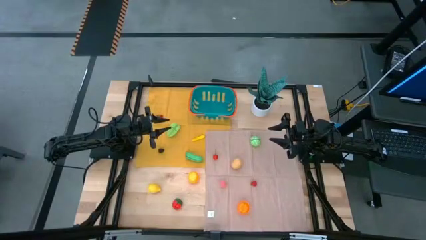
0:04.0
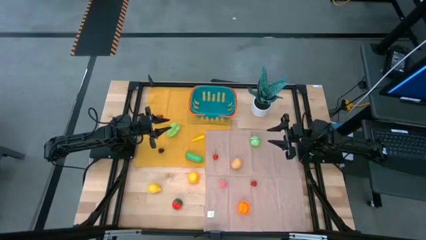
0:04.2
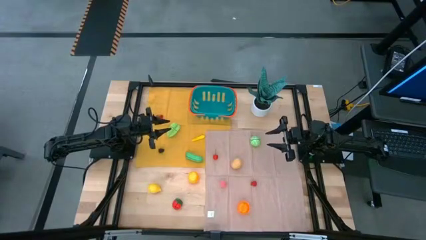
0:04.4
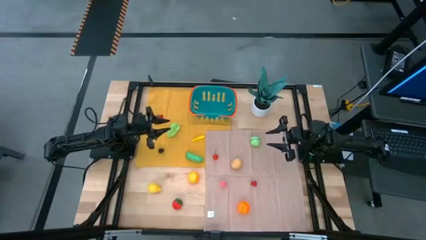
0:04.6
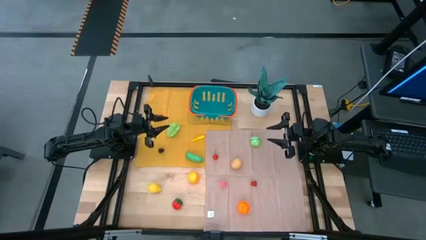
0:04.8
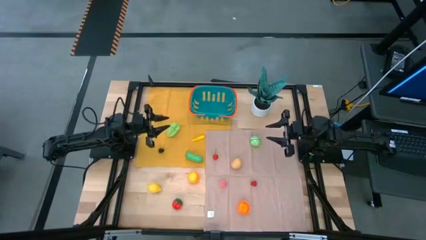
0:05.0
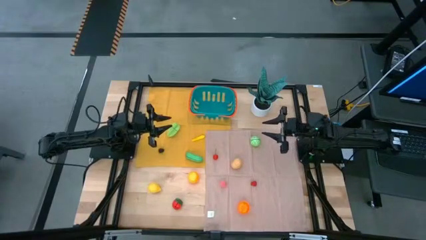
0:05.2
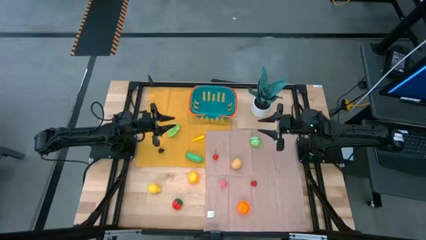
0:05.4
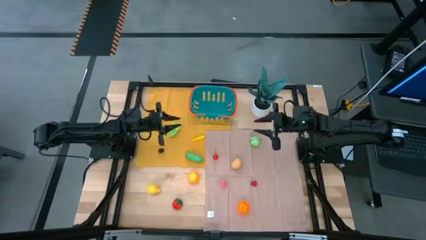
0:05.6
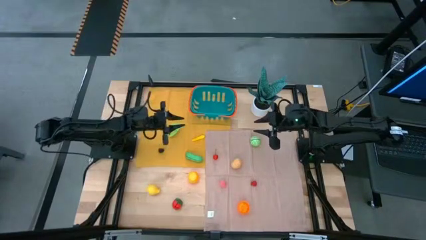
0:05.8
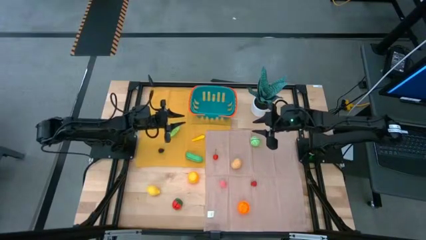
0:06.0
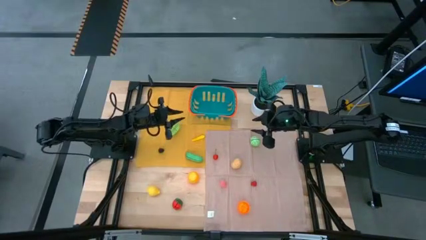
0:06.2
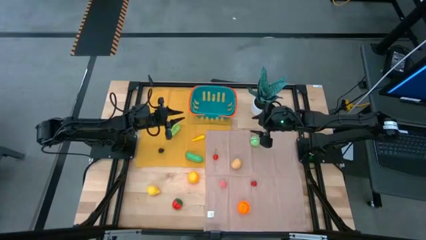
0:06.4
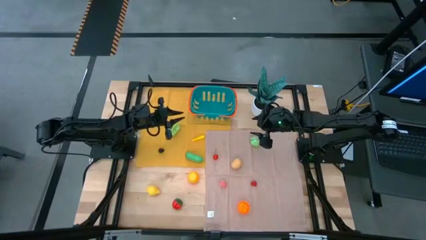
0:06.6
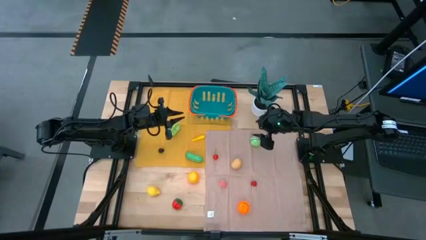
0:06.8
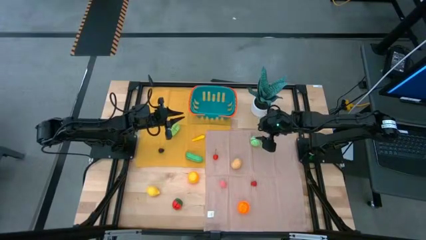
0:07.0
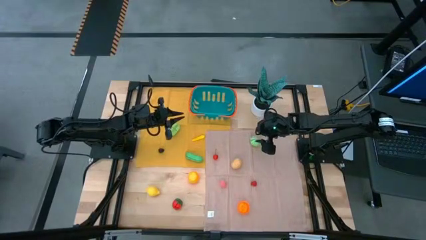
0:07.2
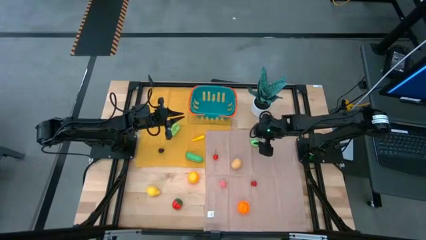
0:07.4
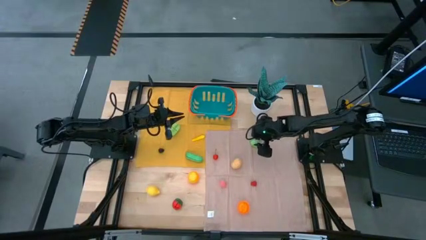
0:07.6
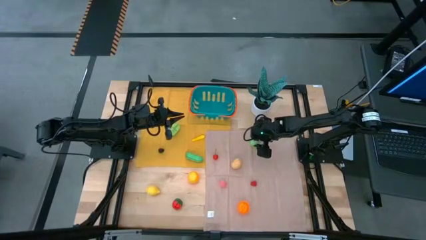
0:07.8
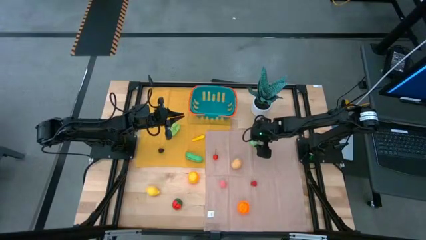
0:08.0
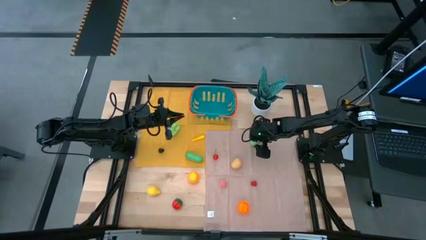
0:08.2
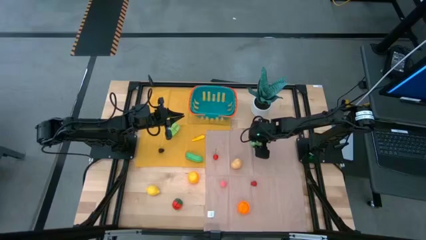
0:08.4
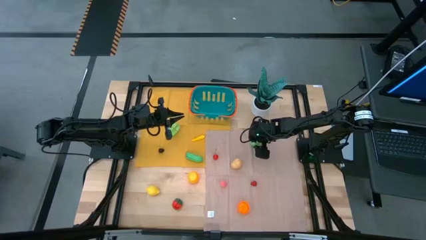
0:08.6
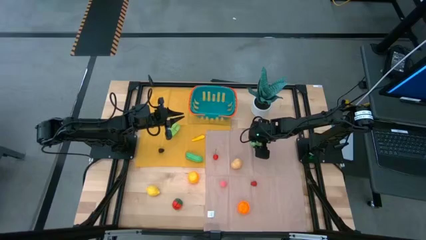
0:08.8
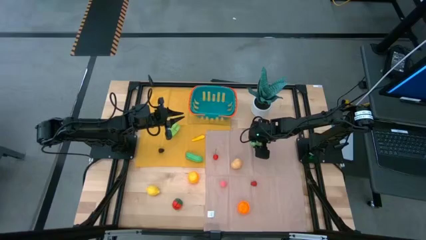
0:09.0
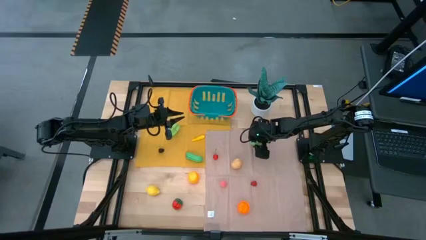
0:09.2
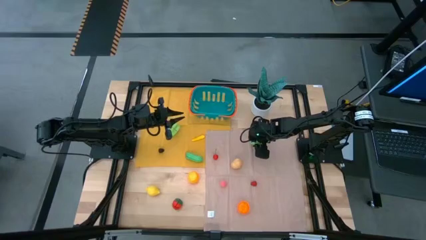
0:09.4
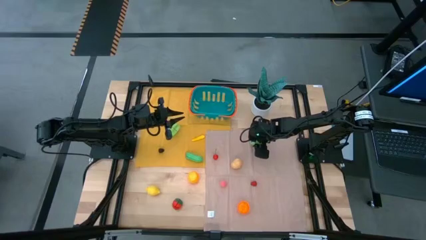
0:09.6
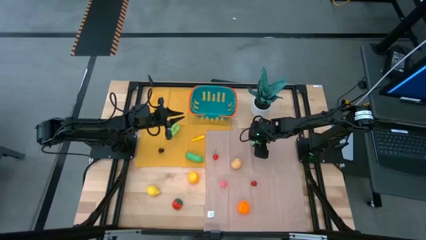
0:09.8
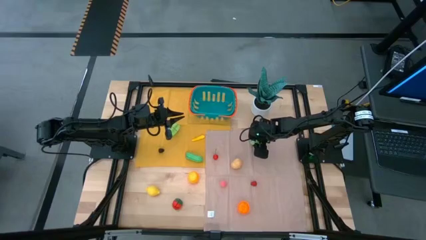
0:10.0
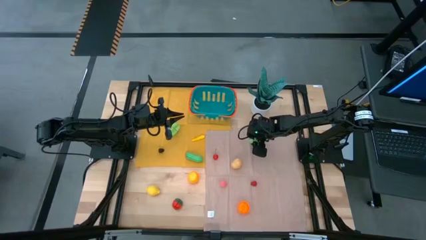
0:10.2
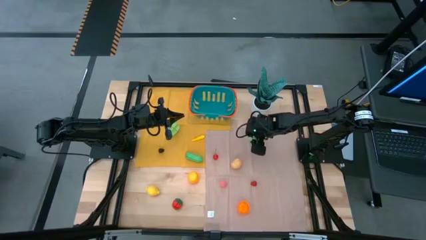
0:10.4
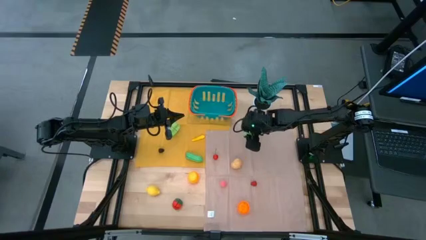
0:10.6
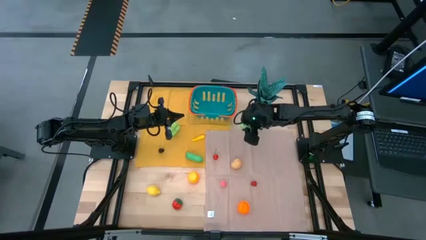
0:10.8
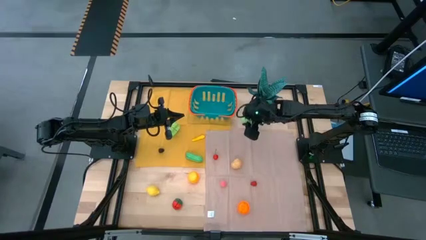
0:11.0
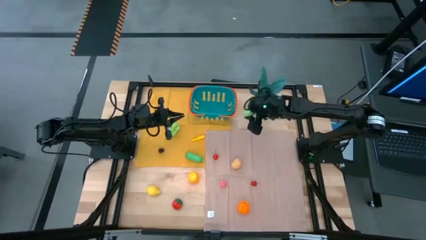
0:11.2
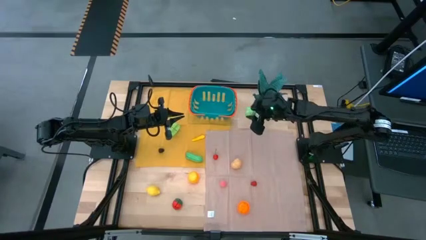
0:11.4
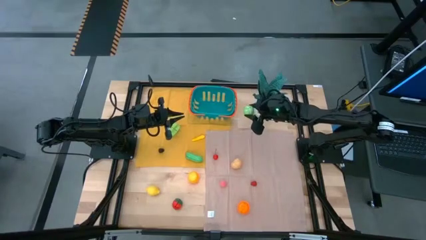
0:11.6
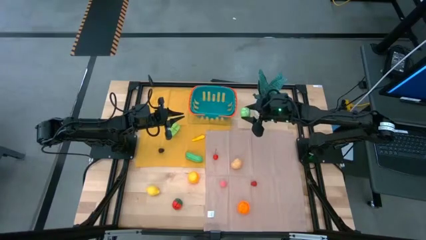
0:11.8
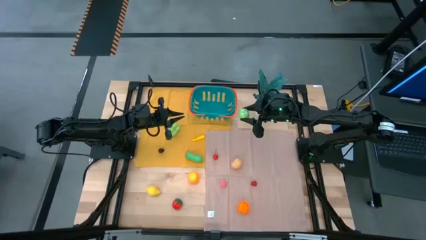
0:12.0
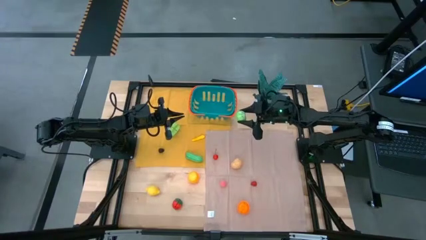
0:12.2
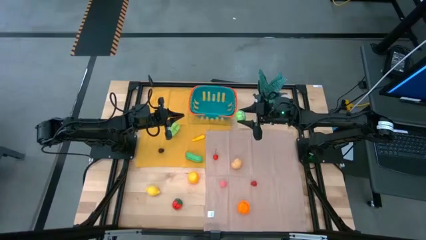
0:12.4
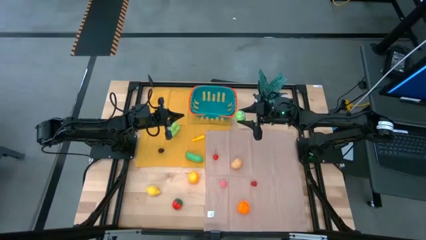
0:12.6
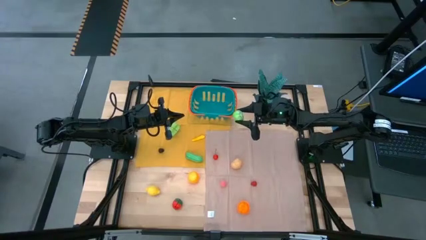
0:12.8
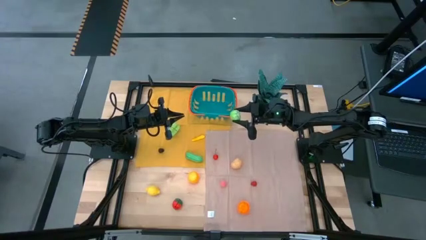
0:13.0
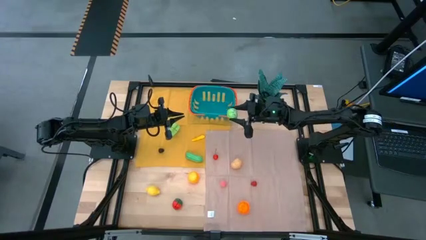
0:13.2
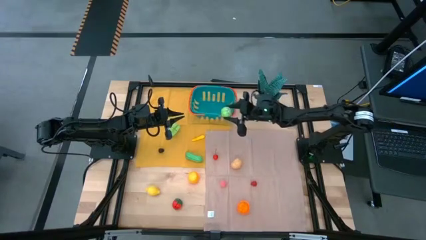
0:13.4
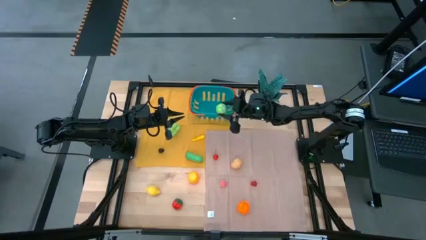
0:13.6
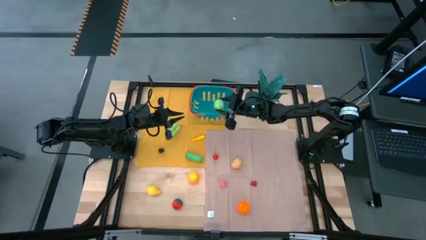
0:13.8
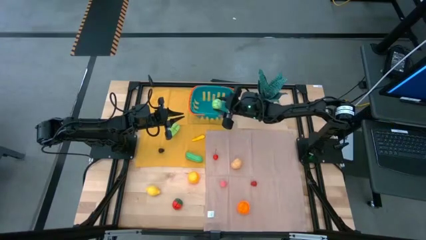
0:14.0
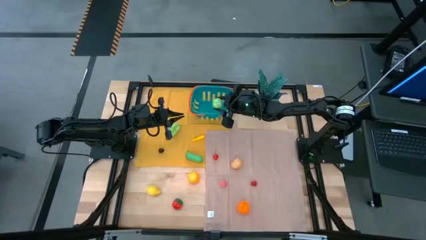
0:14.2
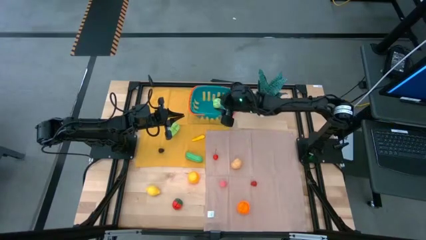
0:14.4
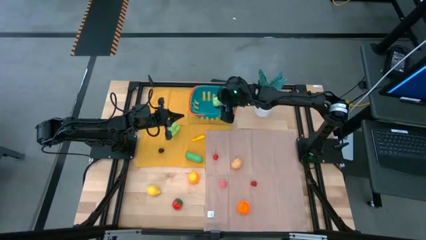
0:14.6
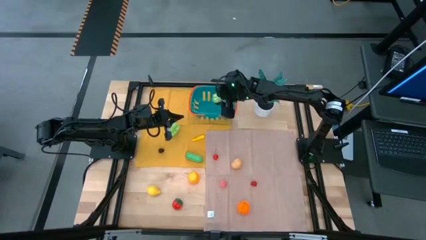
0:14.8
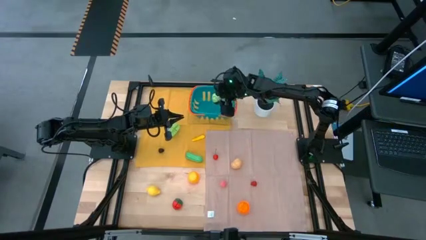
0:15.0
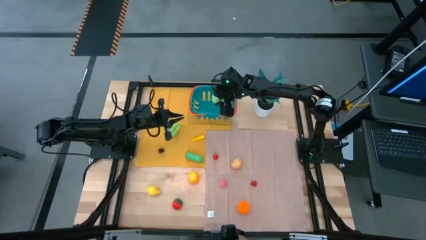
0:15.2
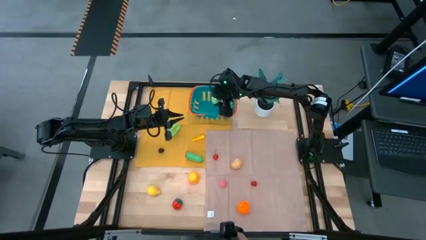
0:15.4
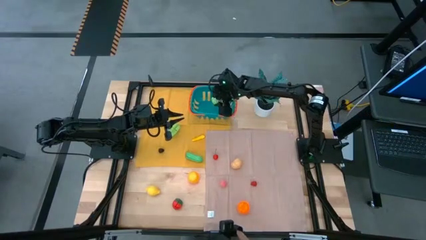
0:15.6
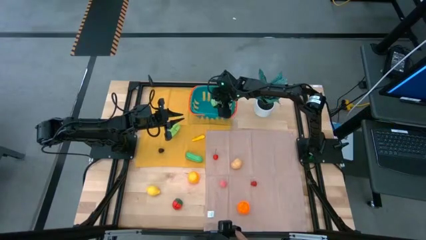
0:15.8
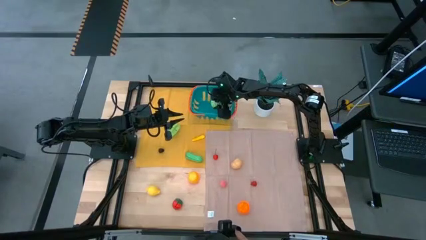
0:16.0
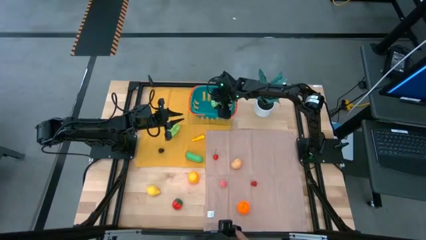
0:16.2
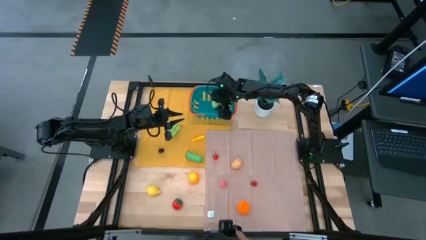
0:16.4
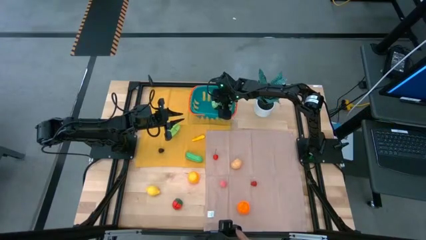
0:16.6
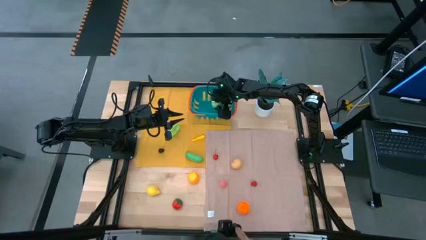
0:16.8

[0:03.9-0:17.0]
Task: Pick and placing Produce into tupperware
Put the green cabbage into the blue basket

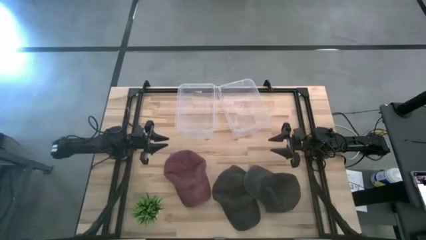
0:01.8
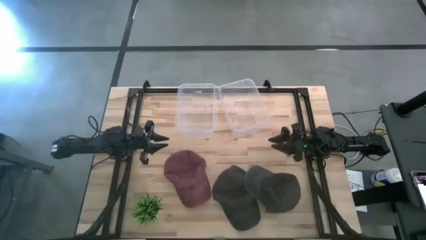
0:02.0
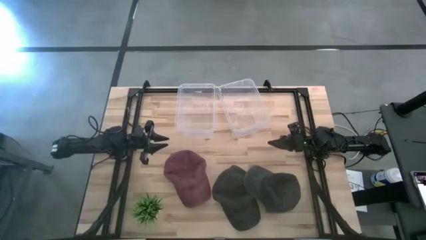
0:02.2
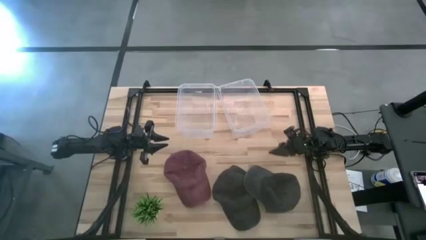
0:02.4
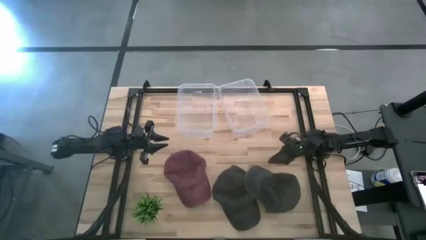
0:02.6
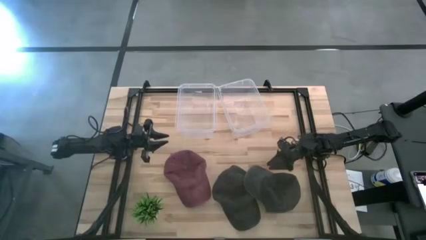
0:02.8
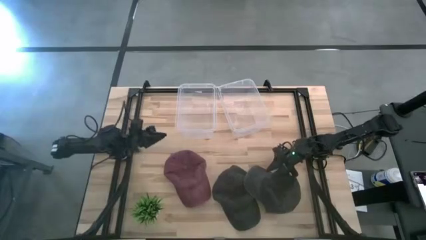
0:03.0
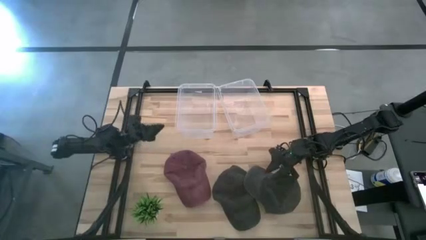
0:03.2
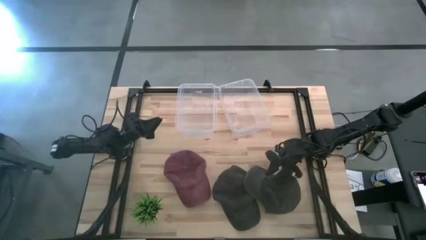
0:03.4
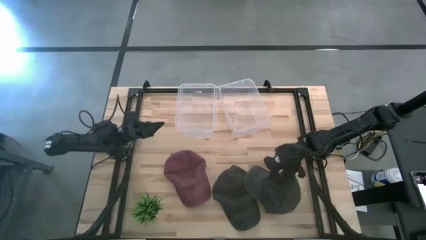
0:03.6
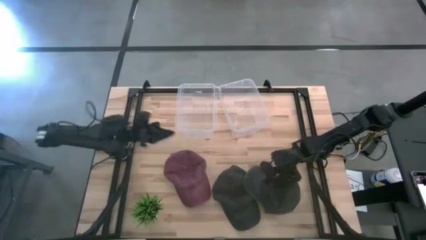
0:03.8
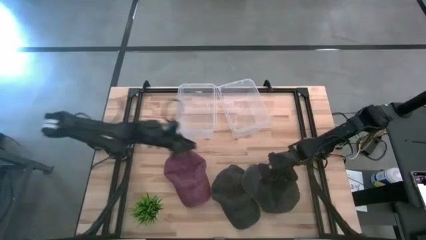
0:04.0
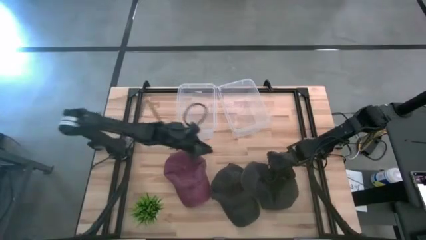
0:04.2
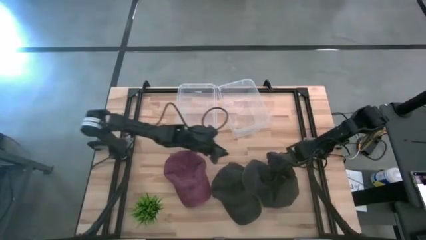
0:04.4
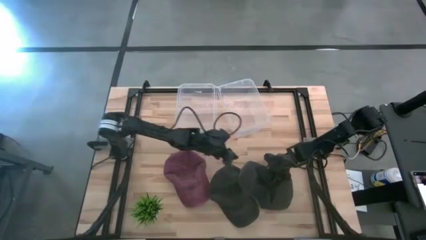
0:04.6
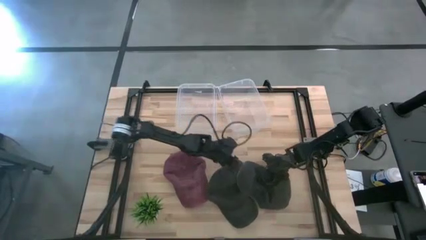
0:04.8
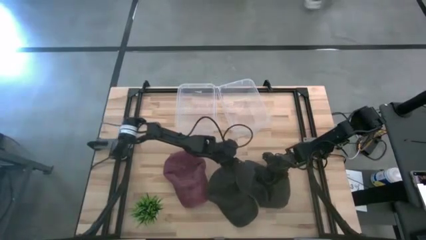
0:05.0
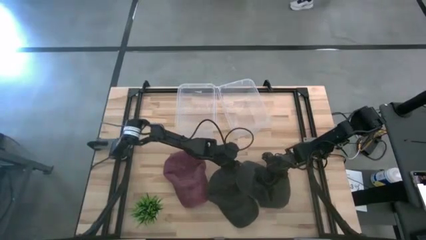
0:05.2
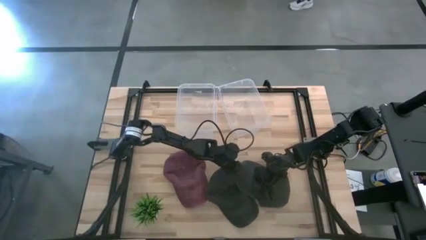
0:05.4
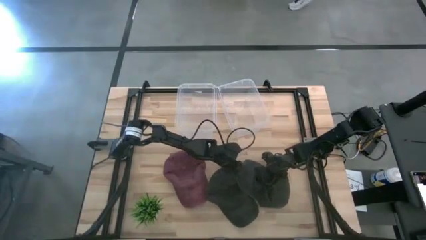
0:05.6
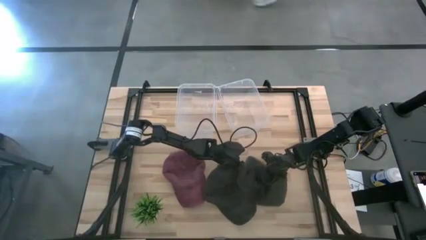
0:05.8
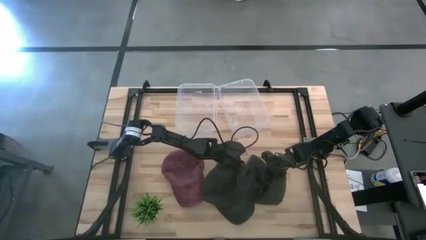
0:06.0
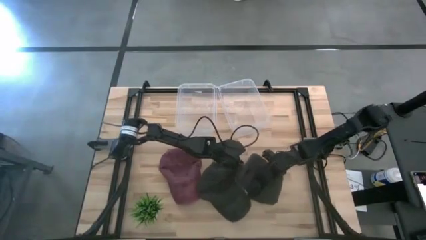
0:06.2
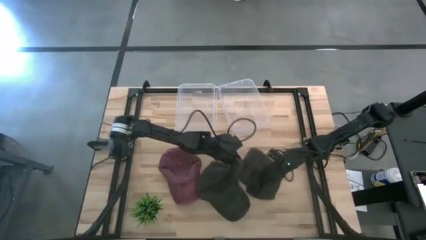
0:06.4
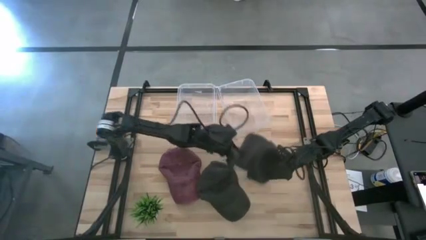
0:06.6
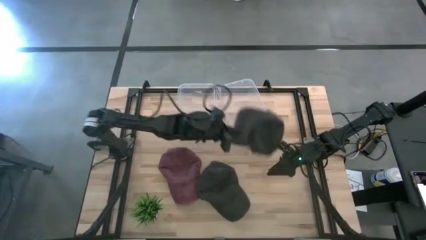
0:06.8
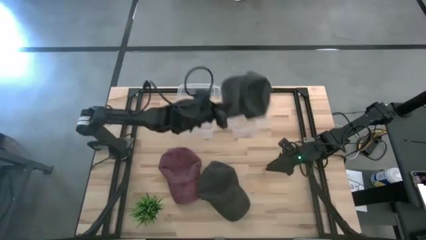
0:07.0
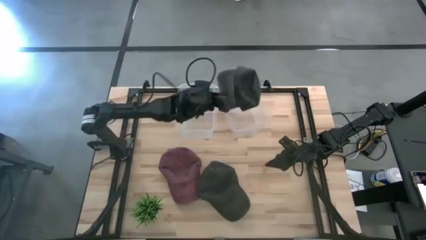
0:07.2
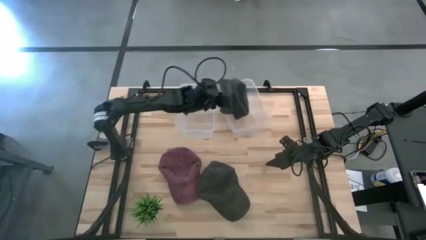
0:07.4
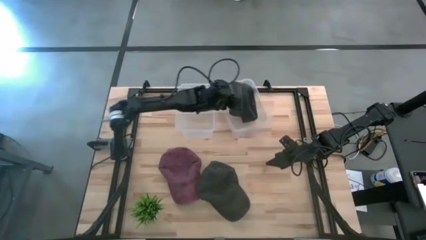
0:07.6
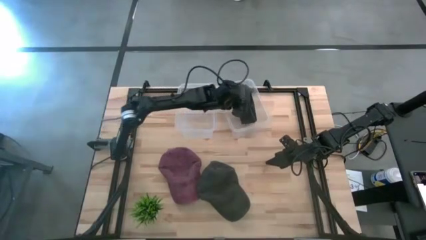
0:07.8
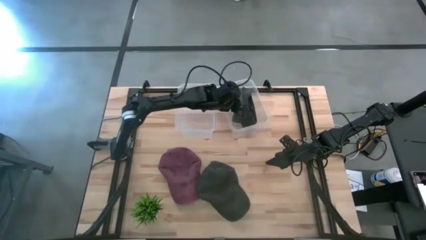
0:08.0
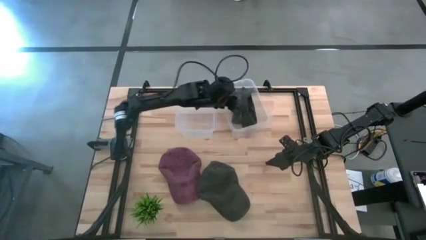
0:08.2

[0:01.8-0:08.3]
Task: Pick & Place hat
Put the right black cap into the right transparent bin
